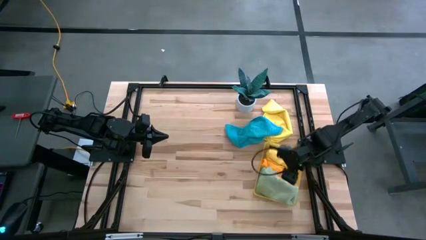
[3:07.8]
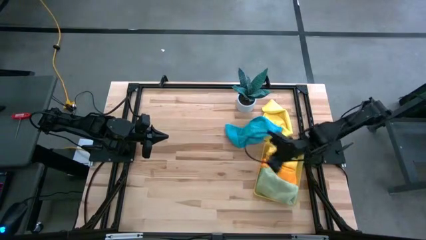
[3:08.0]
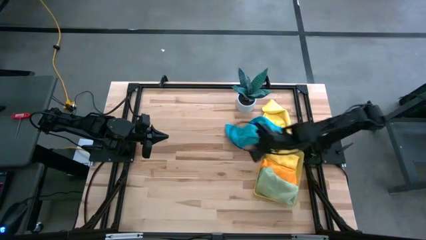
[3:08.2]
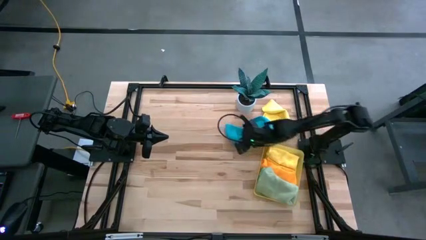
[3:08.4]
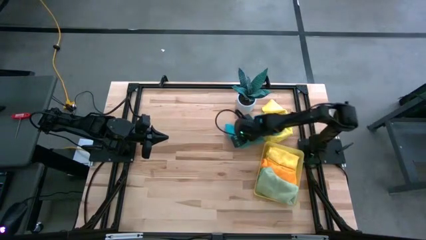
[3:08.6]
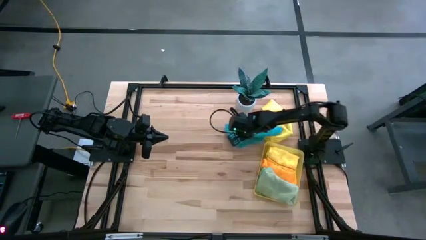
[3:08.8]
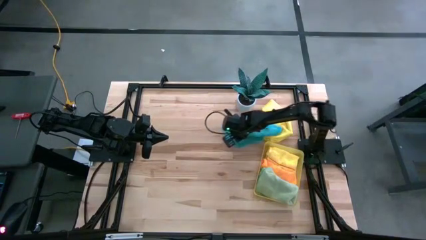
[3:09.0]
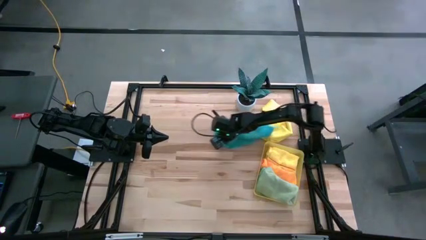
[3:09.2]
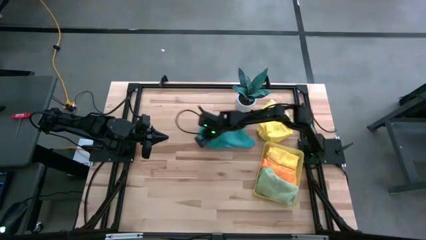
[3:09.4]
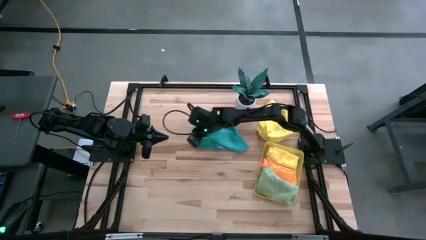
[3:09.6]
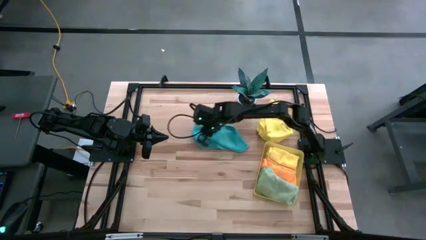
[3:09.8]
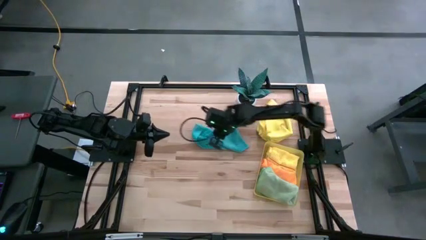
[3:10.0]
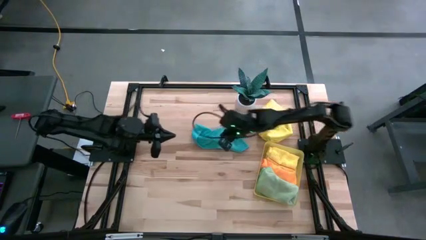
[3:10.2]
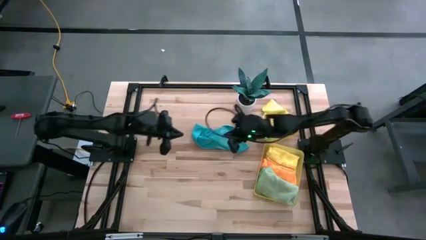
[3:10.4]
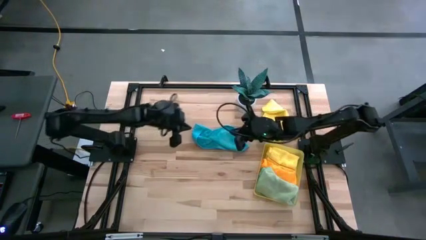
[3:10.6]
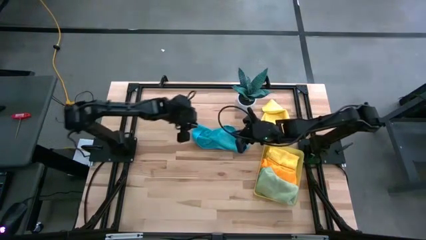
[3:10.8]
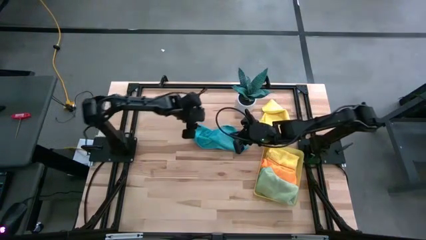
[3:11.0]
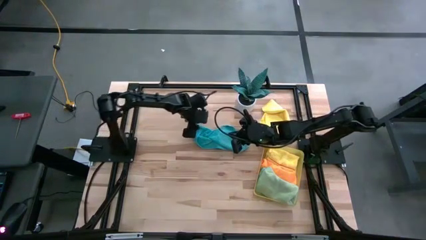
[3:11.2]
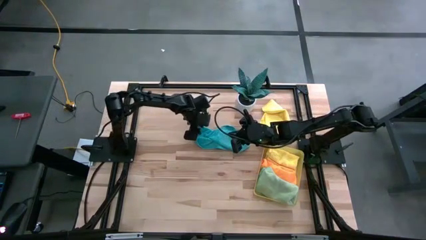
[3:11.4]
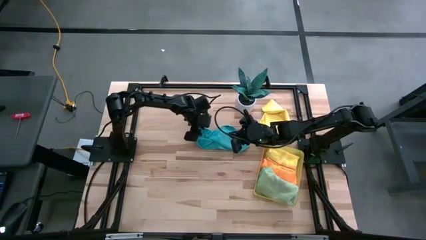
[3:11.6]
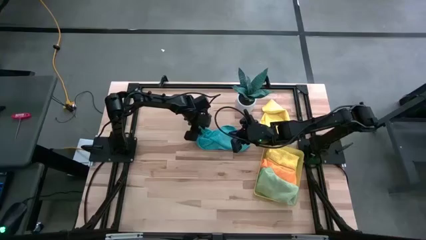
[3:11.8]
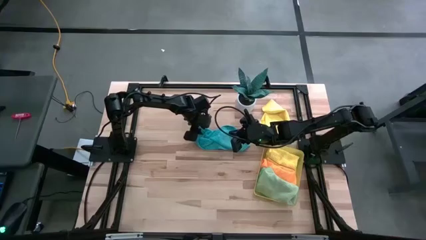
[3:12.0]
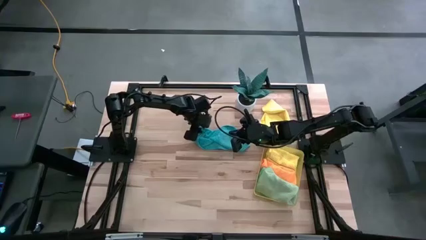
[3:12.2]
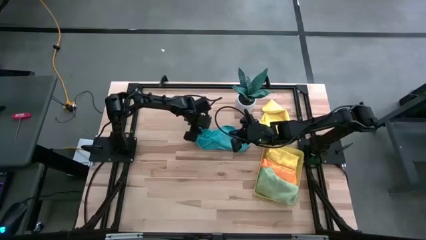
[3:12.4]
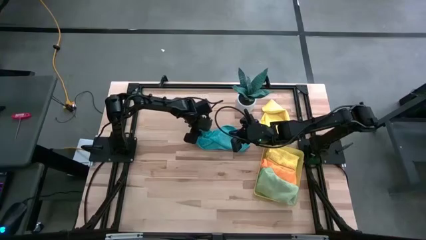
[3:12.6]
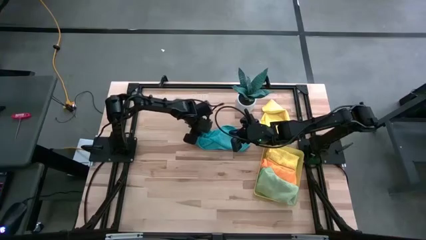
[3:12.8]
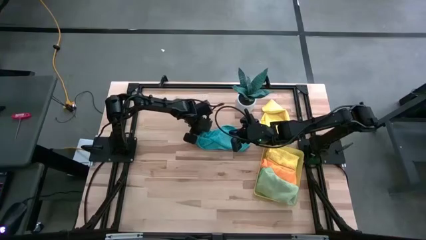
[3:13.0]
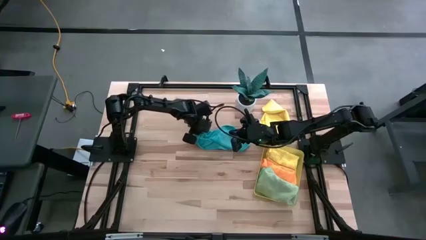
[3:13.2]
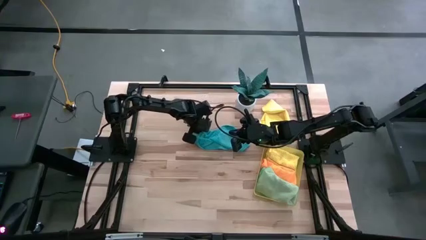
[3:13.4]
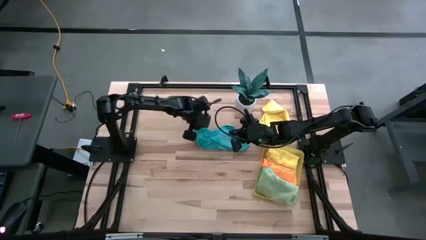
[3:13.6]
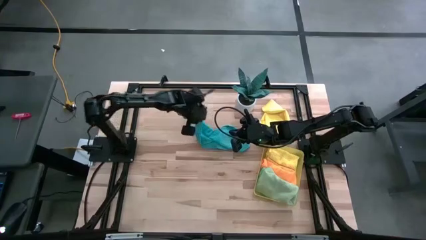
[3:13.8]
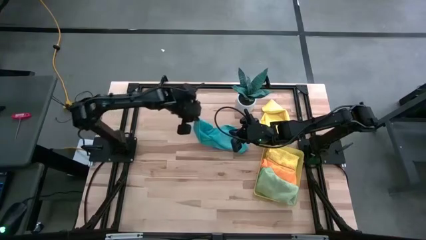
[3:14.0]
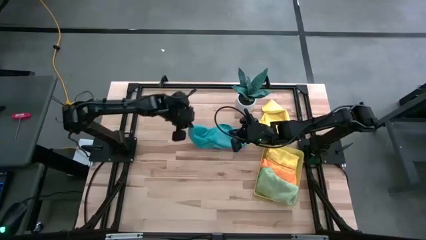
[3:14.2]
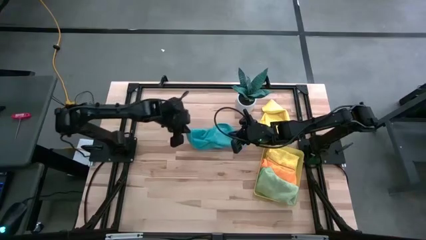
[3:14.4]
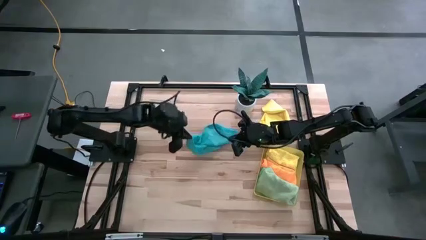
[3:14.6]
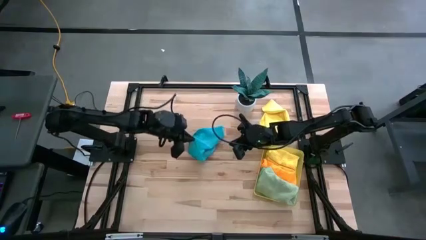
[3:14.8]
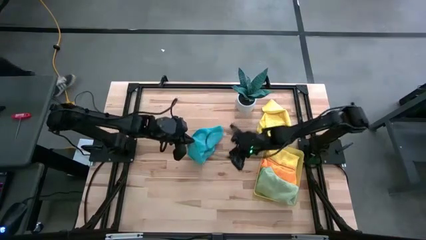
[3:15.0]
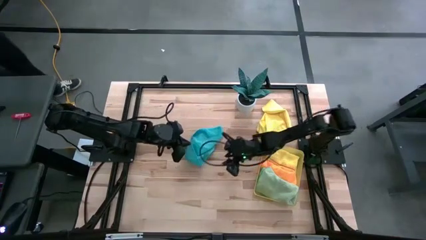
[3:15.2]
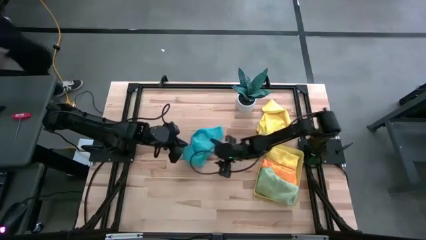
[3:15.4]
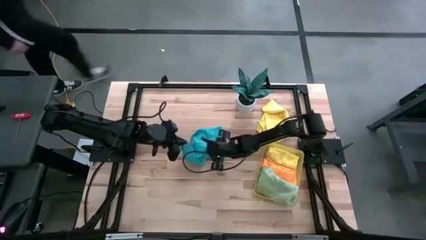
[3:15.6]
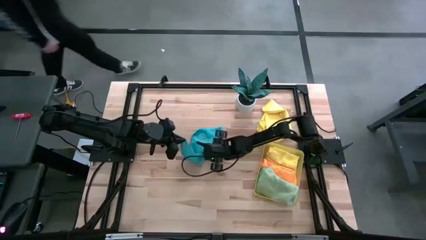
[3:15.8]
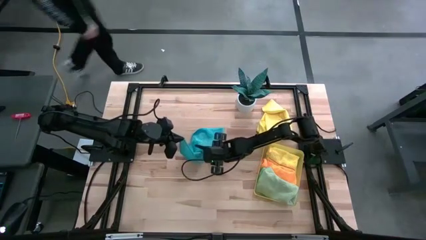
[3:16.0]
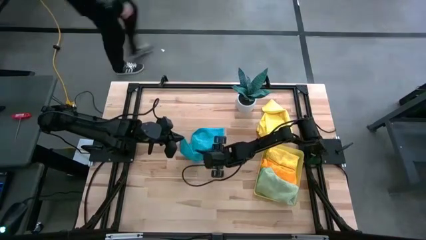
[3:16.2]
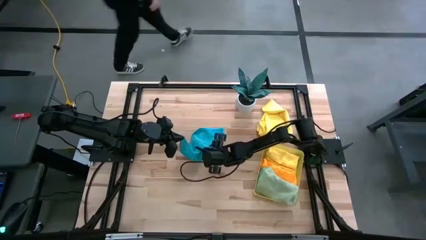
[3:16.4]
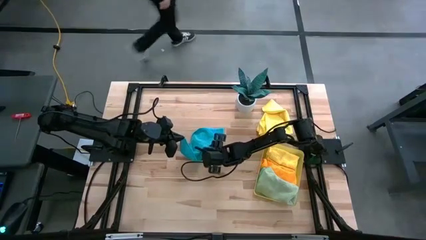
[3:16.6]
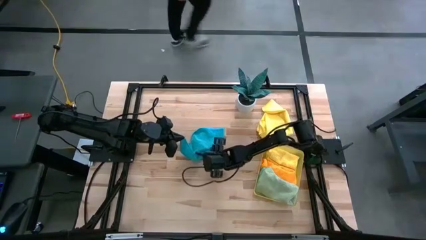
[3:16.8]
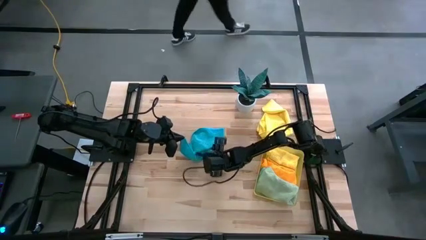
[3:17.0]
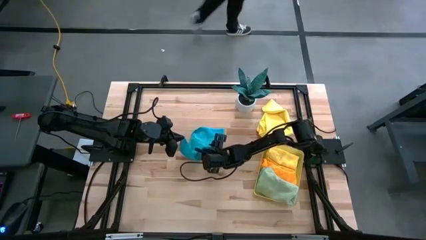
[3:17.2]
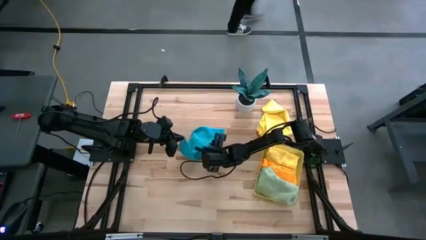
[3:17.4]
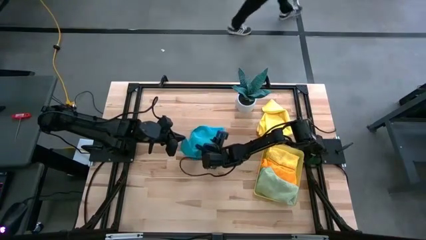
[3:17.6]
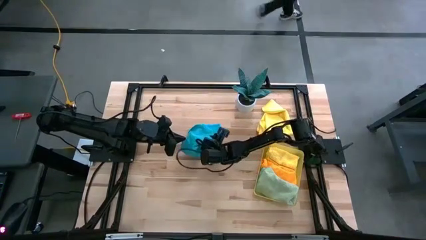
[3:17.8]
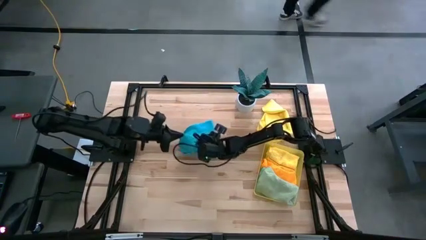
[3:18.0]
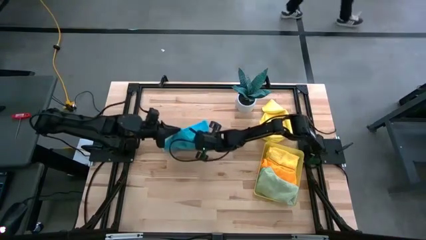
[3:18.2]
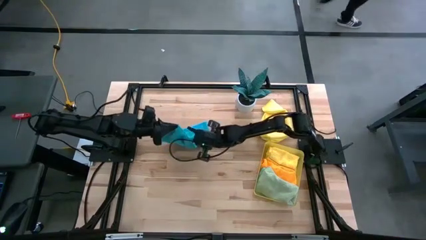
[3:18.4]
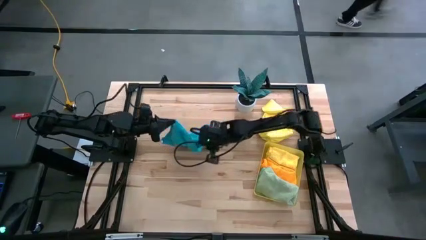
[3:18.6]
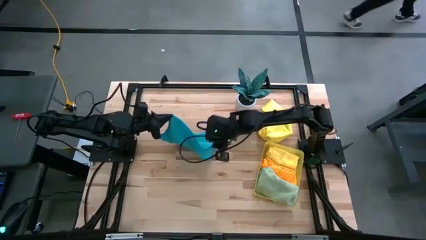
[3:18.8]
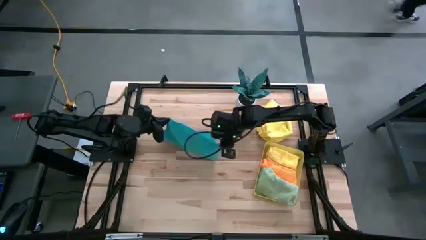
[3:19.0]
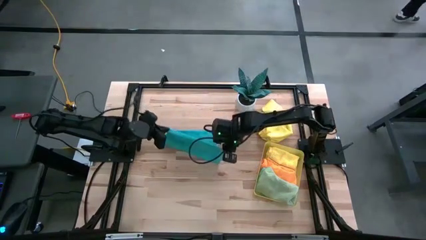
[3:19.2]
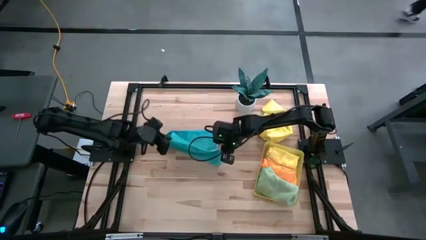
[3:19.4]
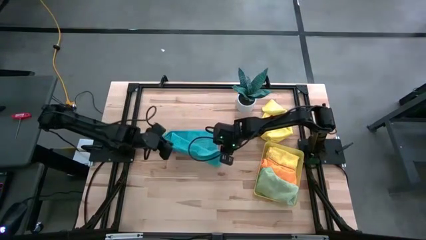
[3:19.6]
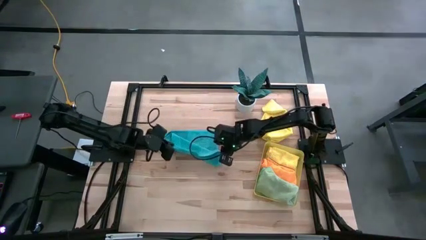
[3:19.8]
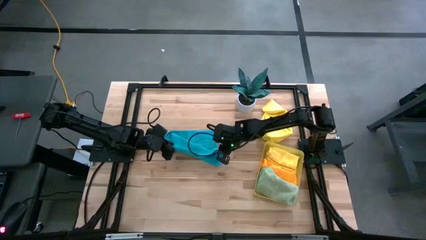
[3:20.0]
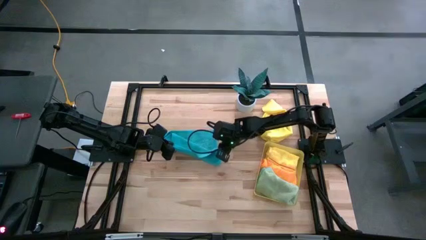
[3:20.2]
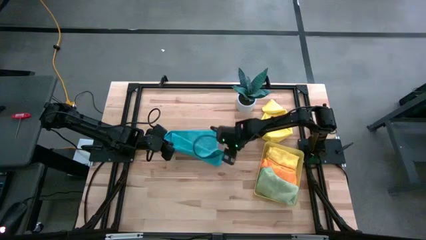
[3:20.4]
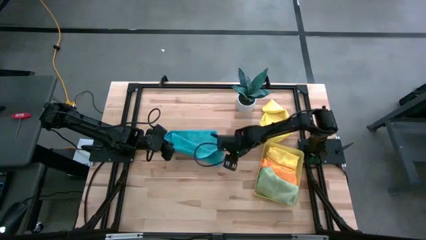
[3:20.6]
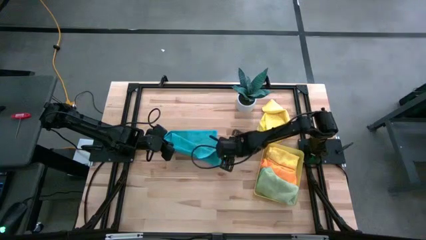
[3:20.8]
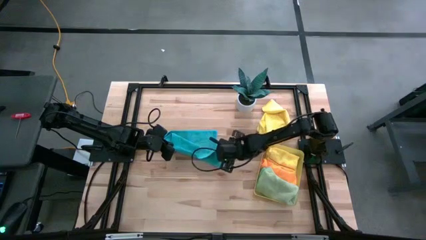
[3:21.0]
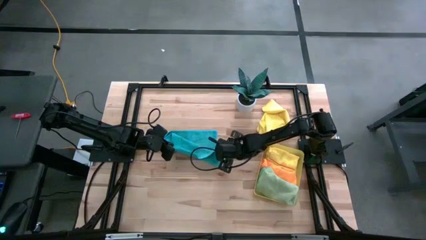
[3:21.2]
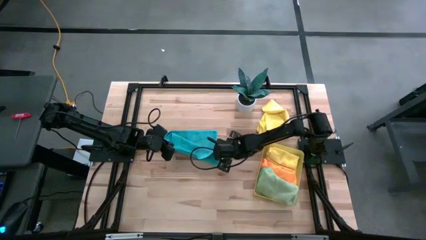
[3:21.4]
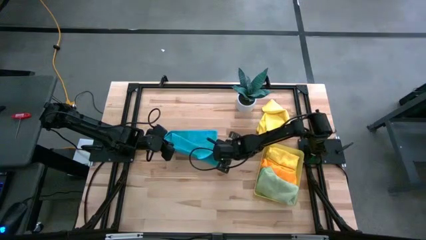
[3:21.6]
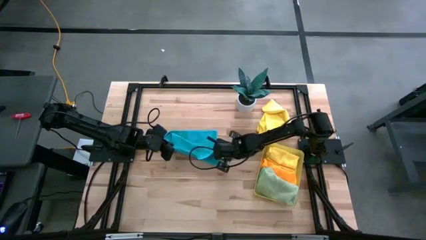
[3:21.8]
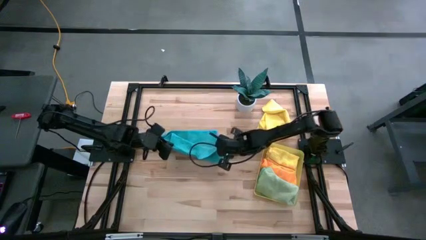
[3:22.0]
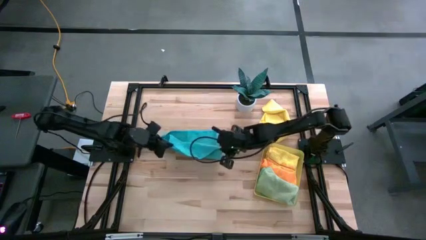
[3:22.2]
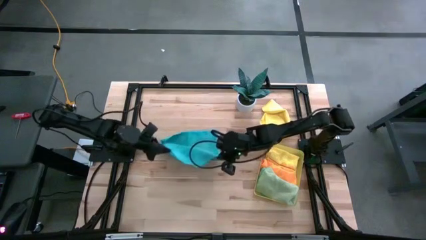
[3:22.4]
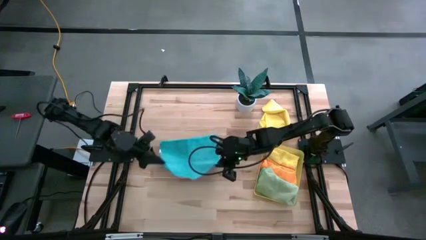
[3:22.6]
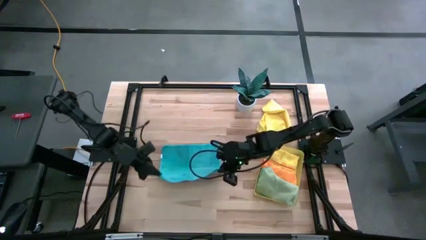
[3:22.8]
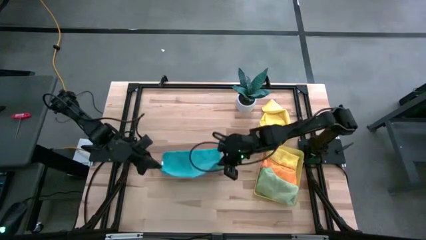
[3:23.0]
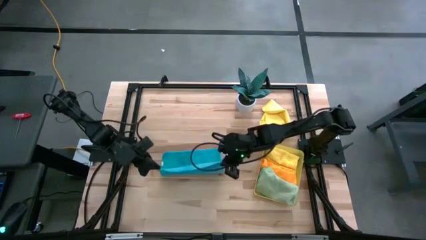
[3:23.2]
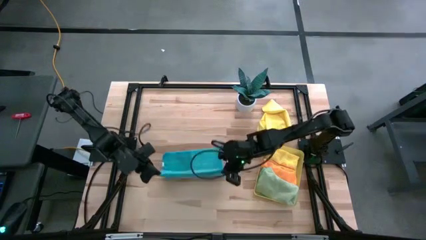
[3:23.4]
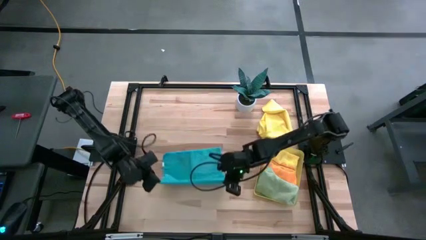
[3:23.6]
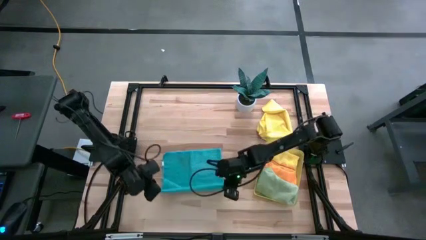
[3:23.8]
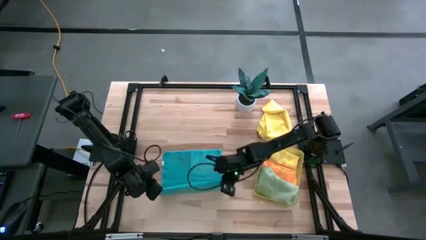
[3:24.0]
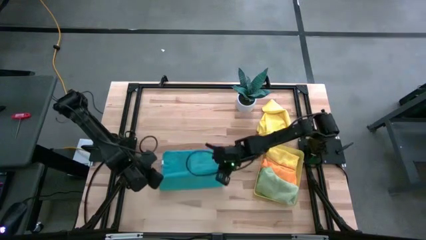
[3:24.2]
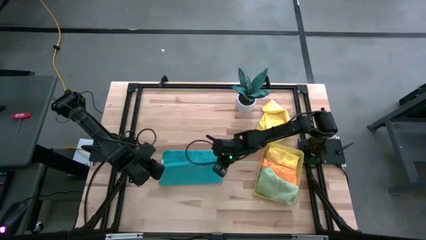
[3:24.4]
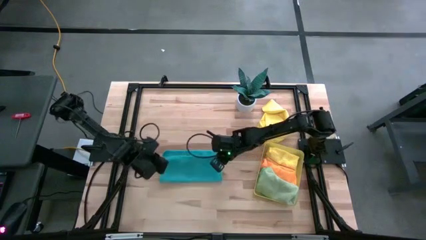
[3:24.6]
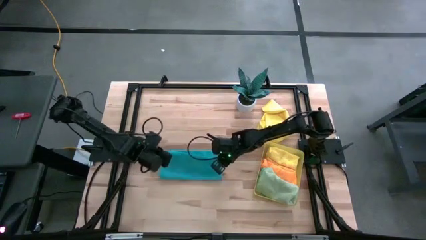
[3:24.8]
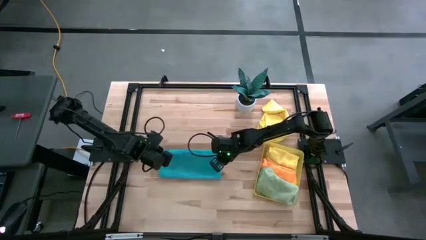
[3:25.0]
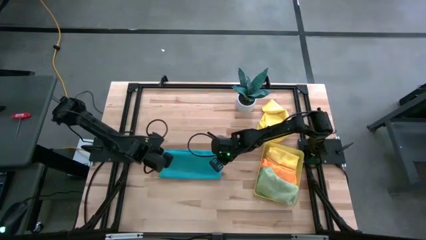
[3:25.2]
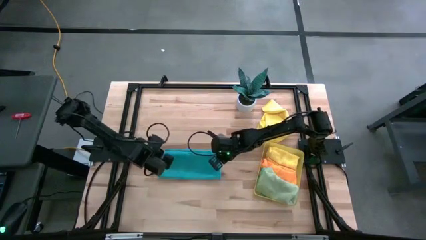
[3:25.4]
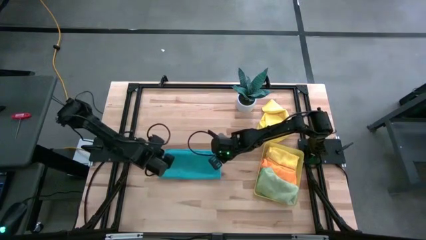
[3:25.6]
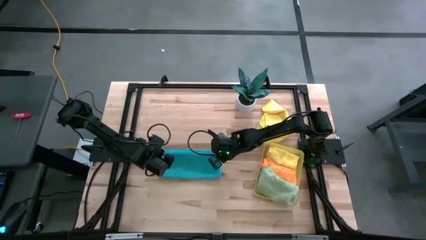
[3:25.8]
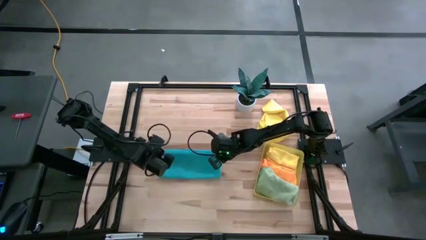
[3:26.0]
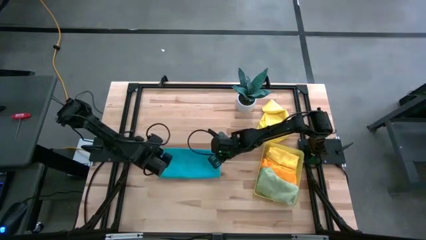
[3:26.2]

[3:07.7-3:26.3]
Task: Fold microfiber towels
Fold the blue microfiber cloth
